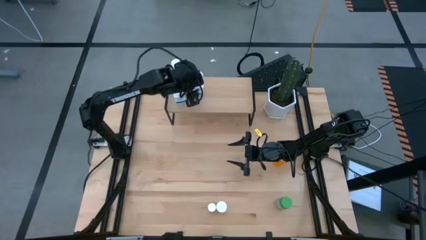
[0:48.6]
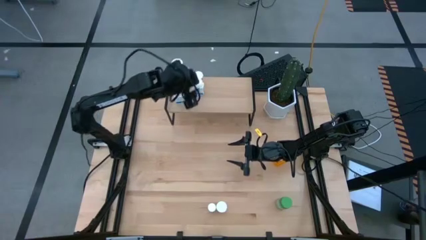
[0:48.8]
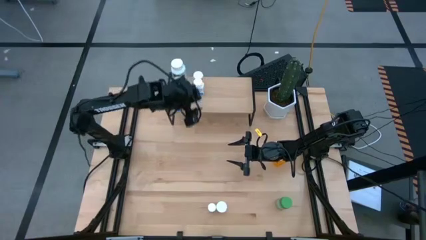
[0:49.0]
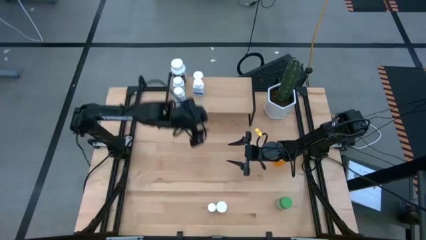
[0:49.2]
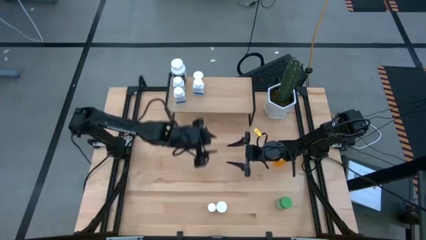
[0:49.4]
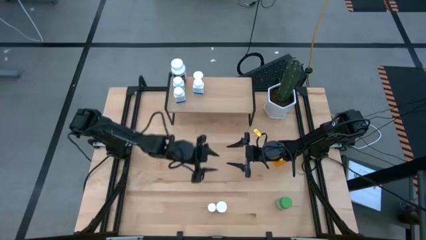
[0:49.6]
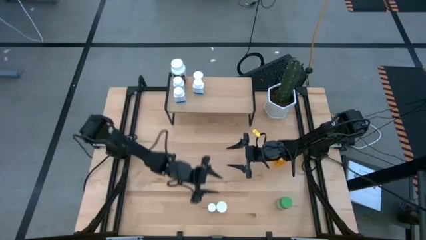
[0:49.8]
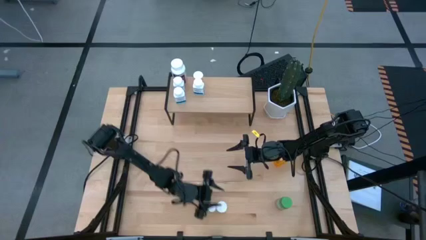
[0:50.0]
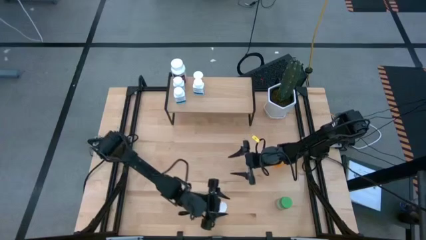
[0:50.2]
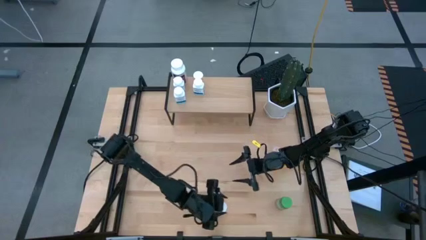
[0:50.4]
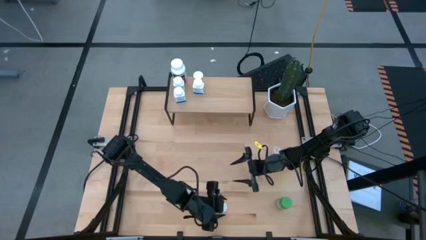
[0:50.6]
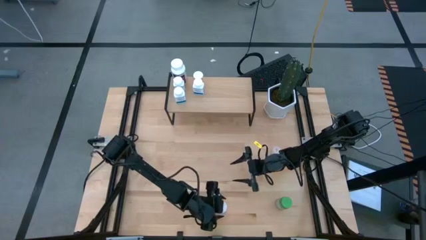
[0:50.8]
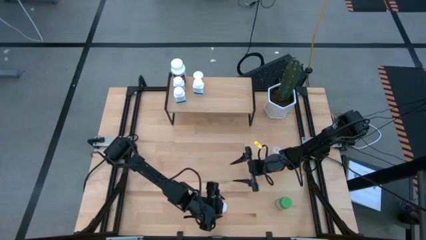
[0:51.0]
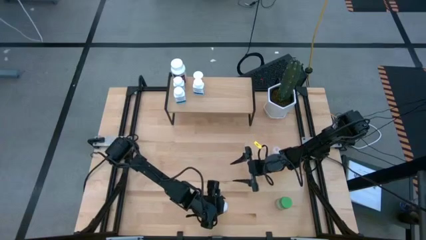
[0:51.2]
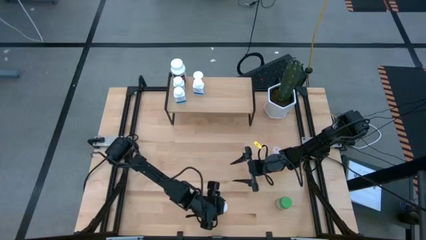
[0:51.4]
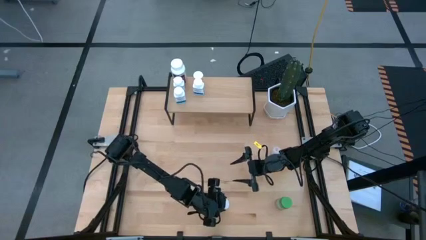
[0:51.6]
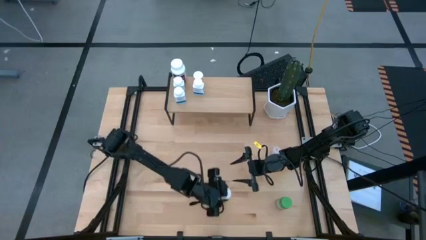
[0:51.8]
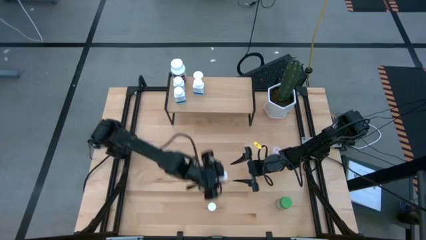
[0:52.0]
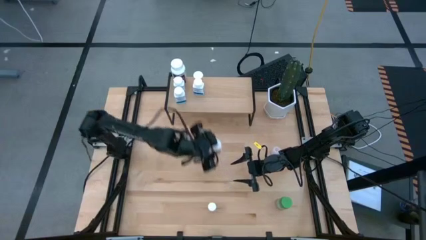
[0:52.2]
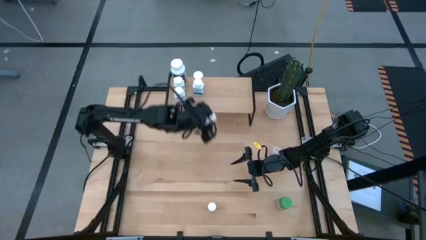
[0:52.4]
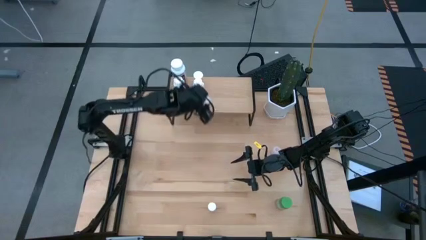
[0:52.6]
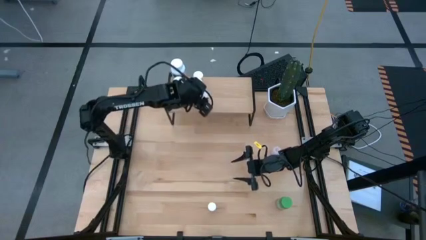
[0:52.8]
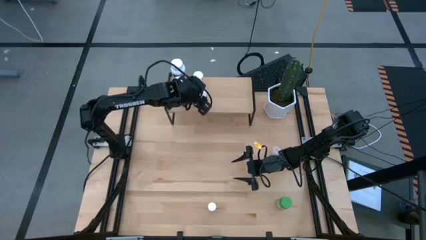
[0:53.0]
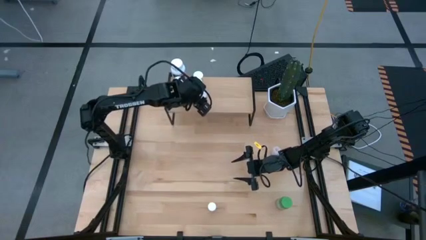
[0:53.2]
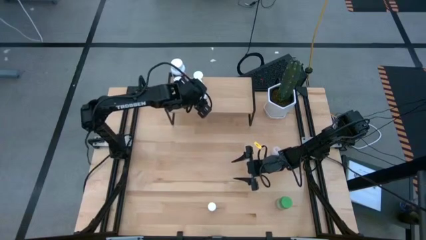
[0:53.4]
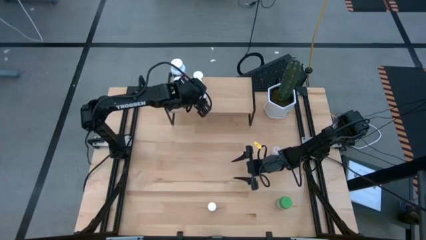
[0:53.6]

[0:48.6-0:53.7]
Task: Pick and place medicine bottles onto shelf by color
Put the bottom orange pill bottle on the shelf

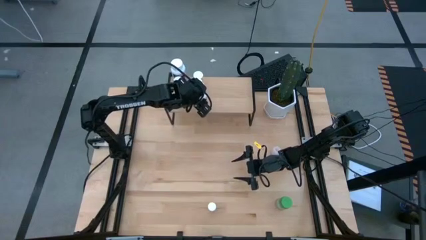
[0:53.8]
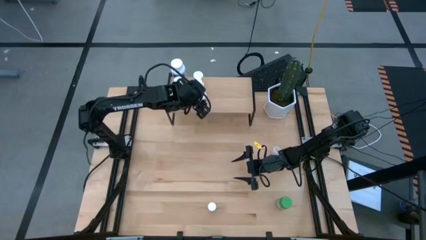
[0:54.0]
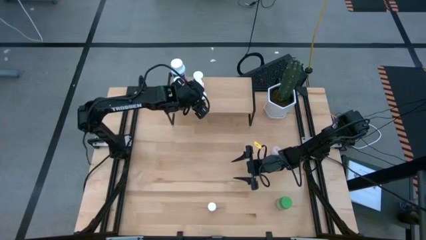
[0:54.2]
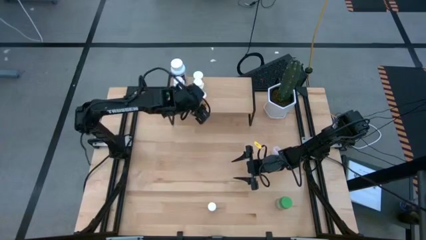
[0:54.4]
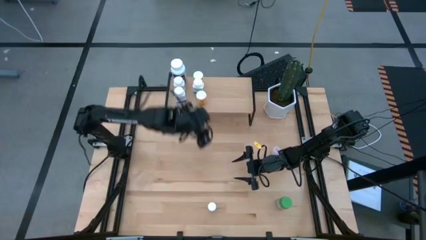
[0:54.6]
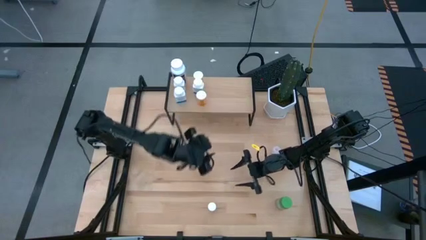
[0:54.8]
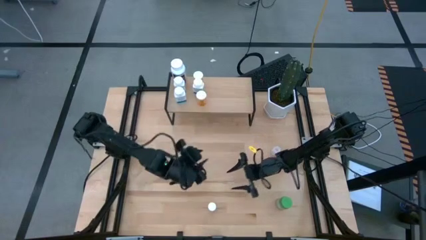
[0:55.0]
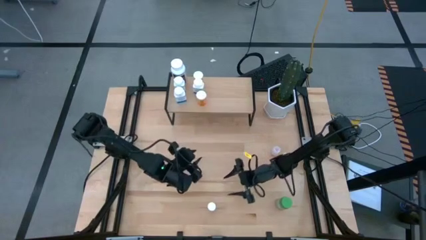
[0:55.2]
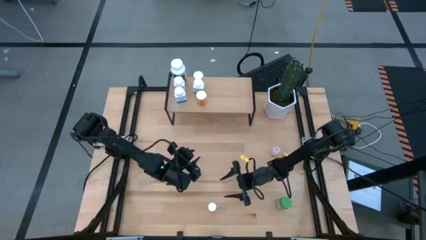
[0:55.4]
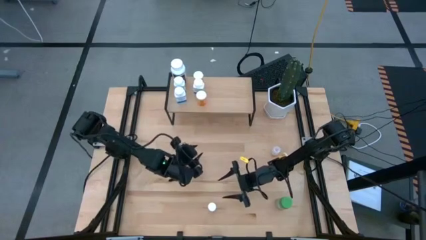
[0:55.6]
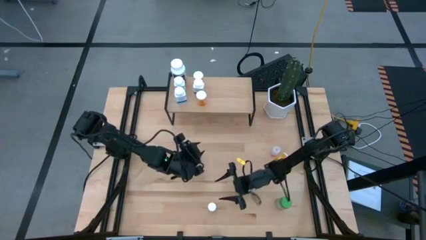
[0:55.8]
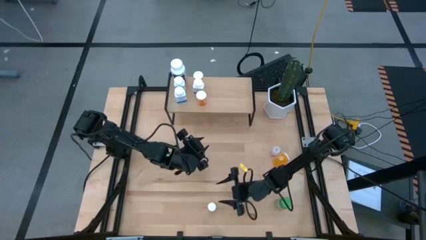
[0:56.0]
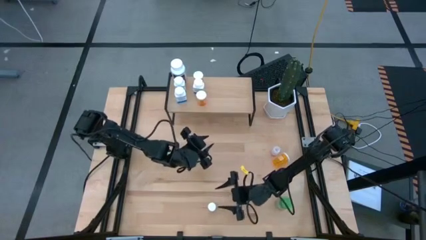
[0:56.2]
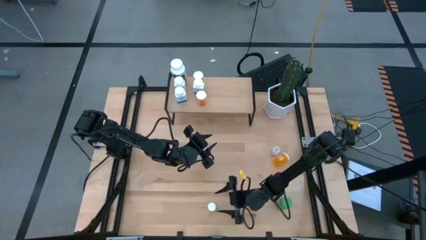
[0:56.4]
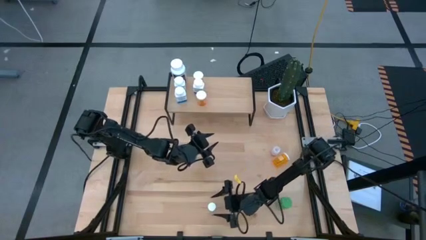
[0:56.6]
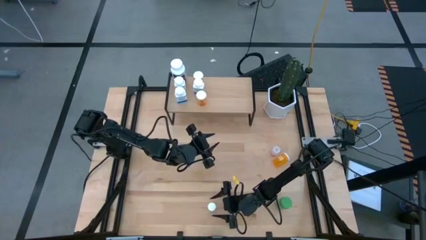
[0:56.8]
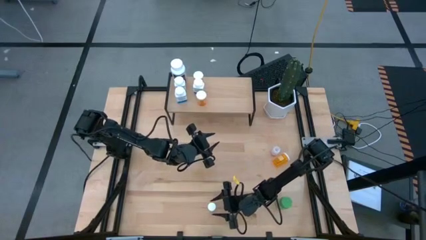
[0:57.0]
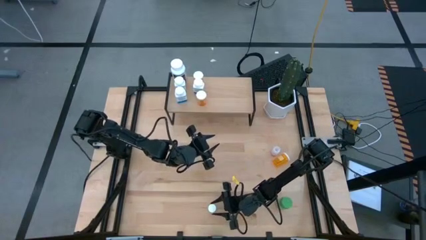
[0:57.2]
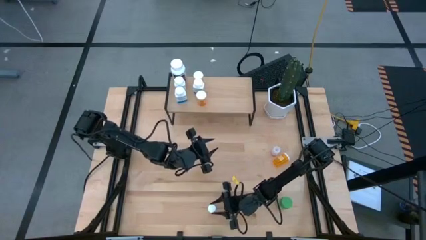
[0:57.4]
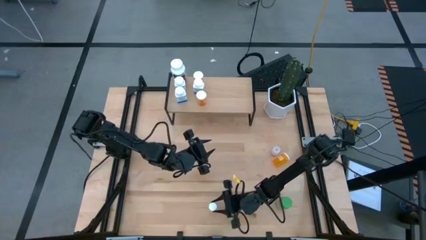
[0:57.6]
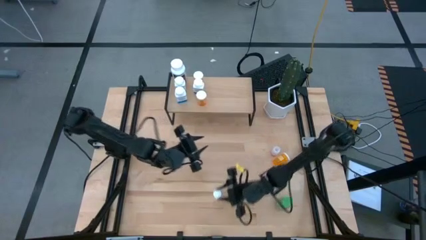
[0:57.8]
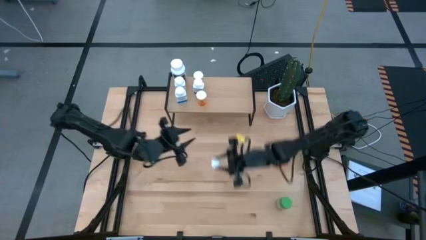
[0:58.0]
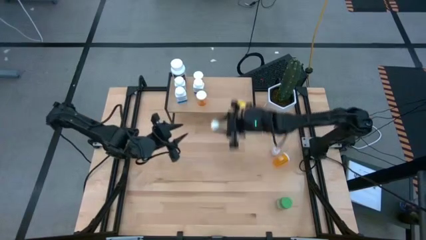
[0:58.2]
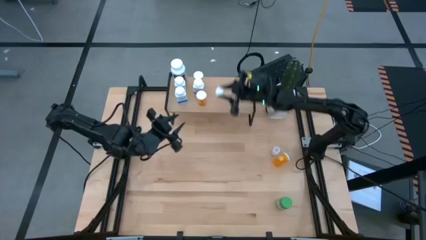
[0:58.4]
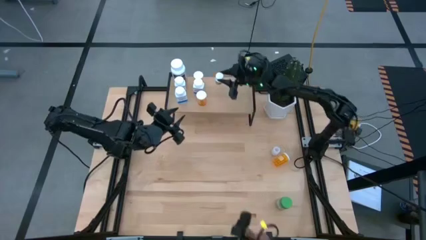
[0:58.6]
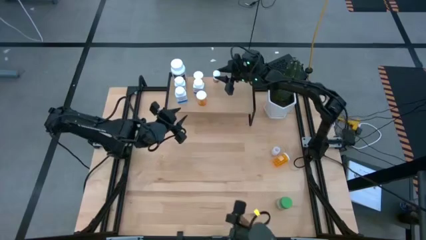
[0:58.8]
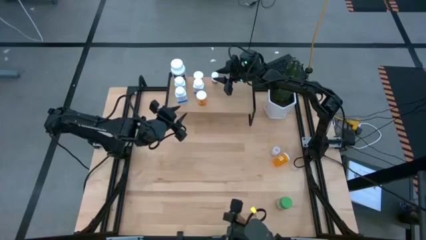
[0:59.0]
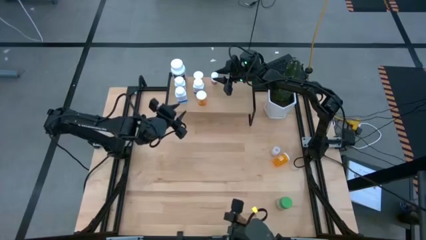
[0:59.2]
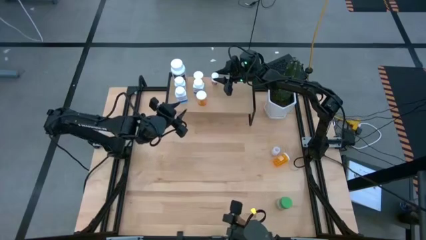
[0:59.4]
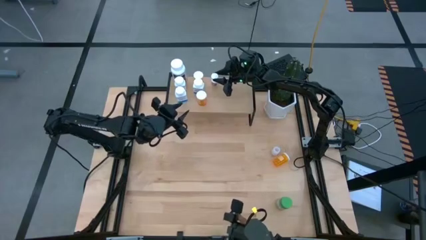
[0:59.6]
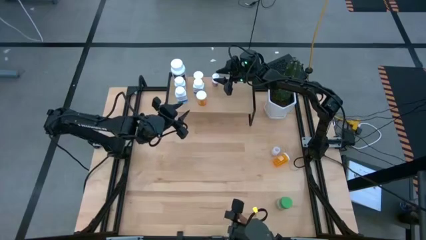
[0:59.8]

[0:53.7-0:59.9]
Put the white black pill bottle on the shelf

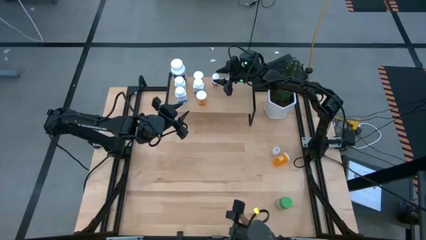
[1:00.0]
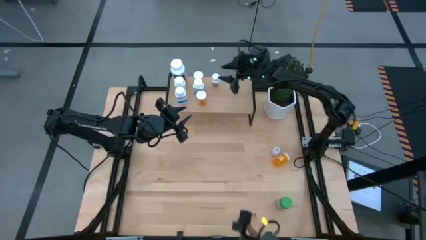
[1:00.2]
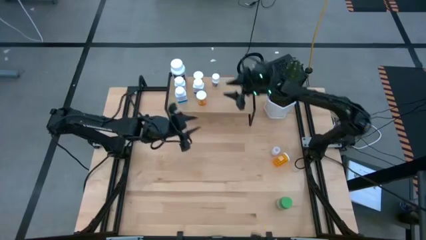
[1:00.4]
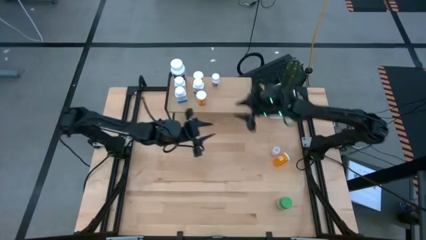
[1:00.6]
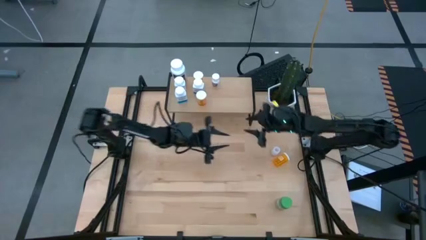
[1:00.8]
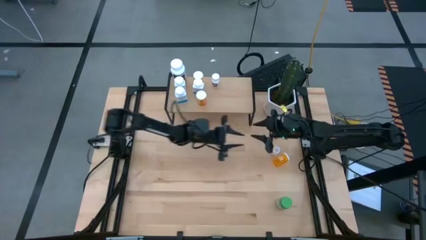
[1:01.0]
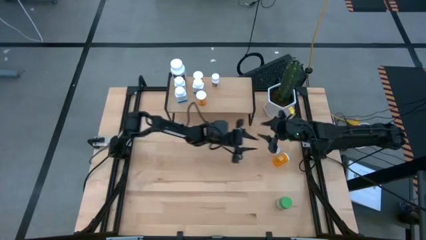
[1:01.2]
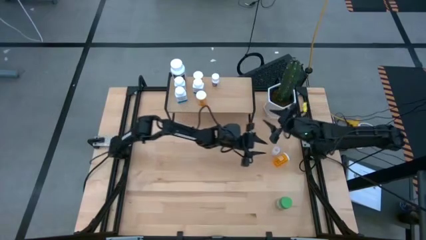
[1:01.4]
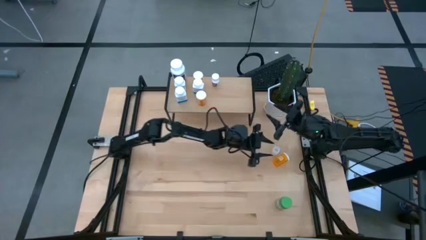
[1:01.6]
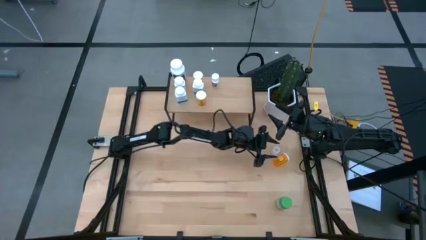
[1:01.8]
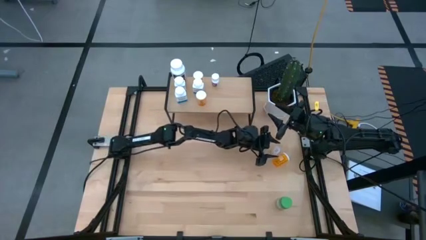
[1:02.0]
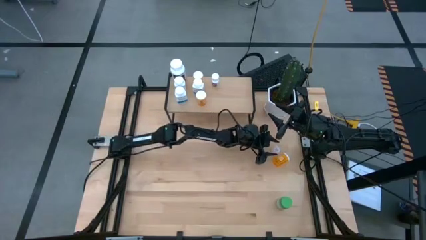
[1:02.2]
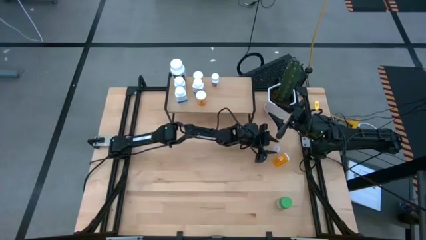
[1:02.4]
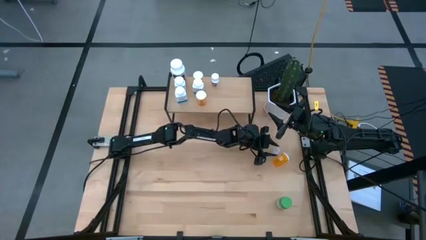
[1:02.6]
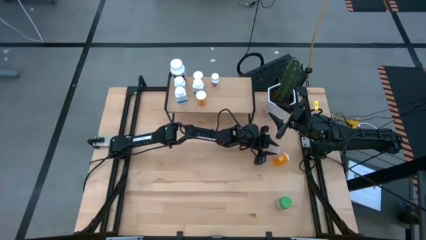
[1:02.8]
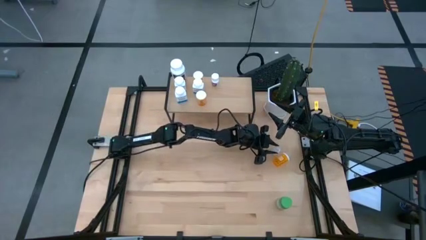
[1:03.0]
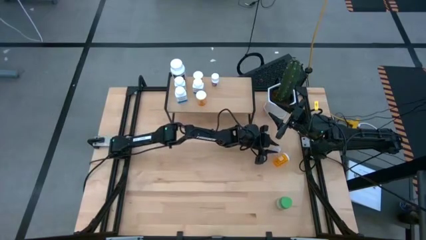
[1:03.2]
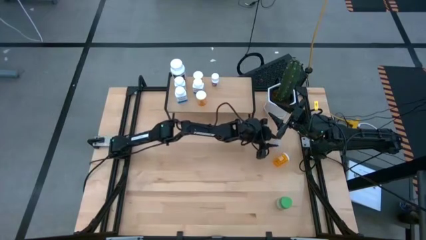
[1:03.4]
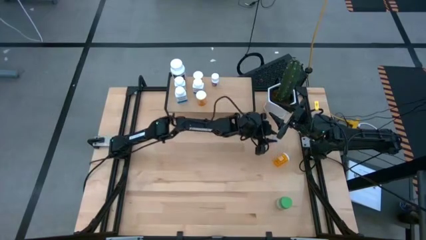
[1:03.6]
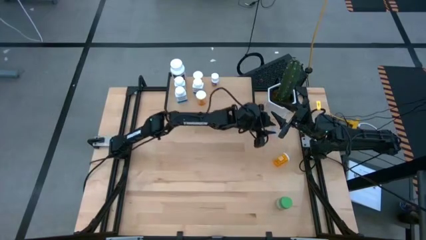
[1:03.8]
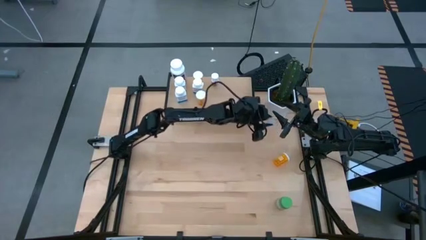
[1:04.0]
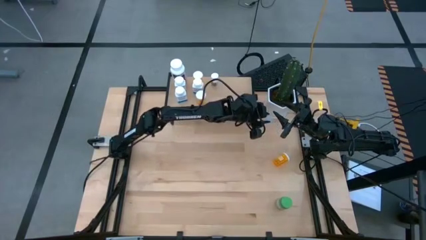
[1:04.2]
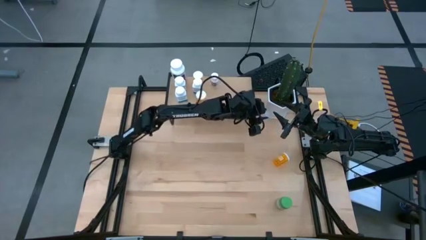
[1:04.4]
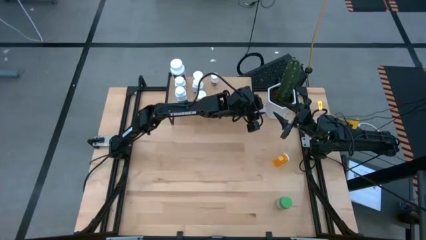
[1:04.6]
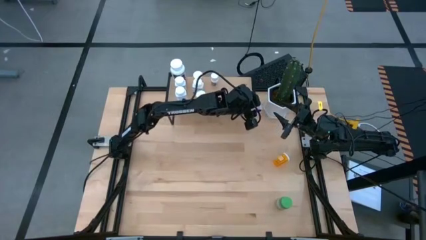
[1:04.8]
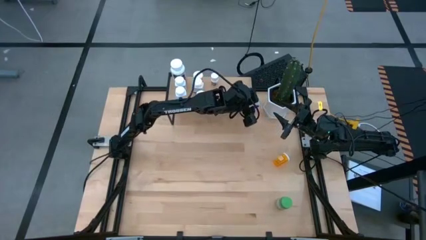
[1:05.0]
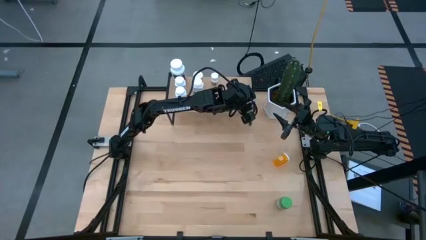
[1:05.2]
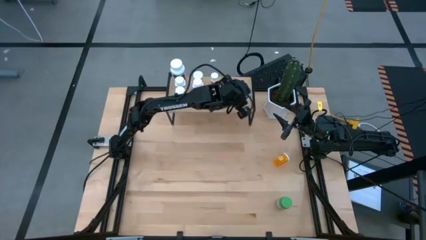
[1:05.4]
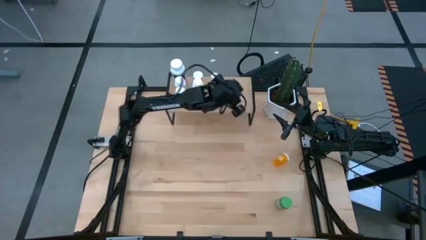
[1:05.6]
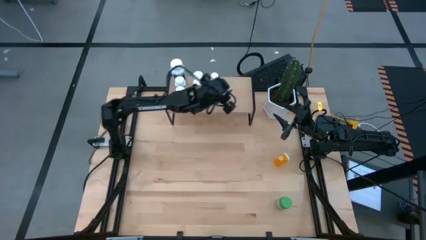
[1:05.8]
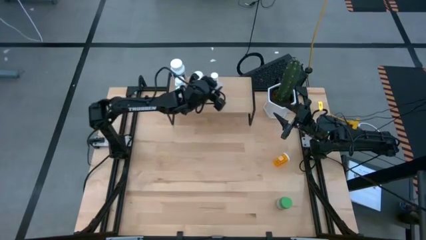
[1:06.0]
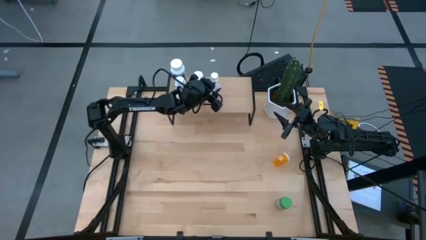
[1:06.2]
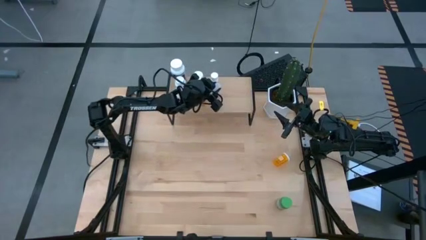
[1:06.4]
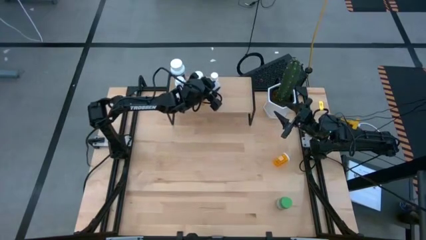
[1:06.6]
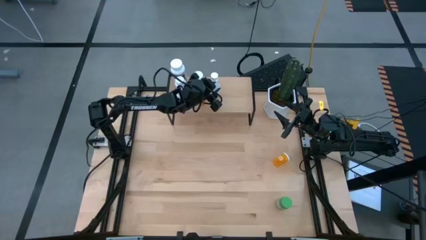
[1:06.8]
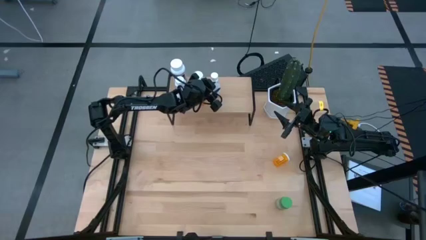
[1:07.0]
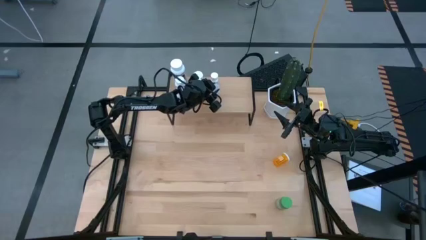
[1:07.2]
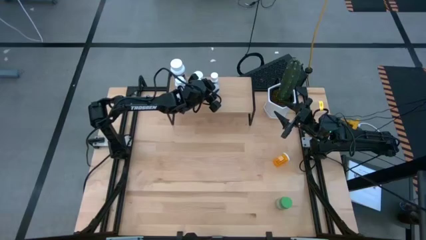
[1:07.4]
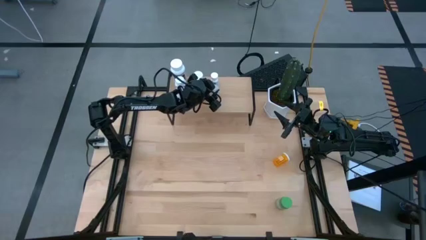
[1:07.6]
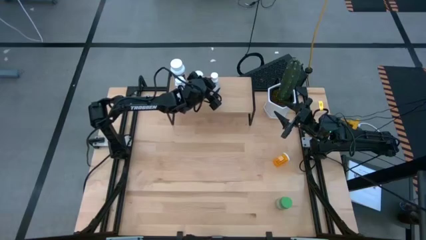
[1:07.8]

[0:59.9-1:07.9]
Put the white pill bottle on the shelf
